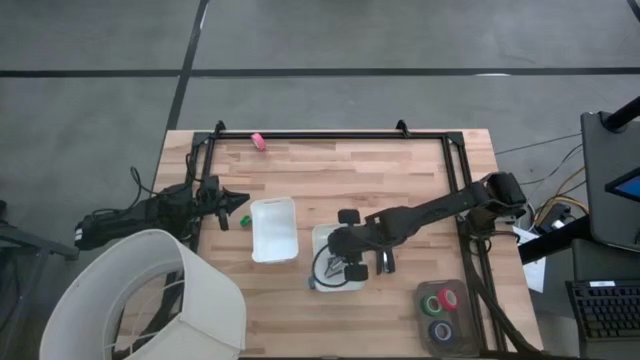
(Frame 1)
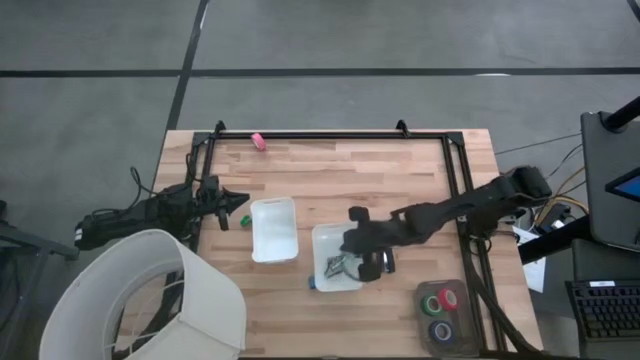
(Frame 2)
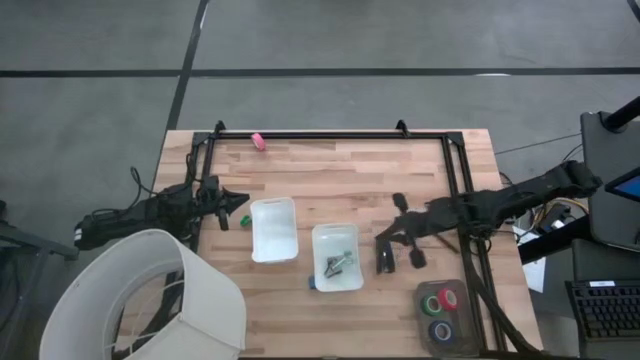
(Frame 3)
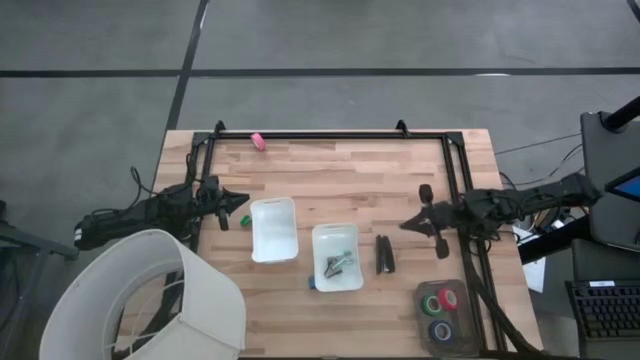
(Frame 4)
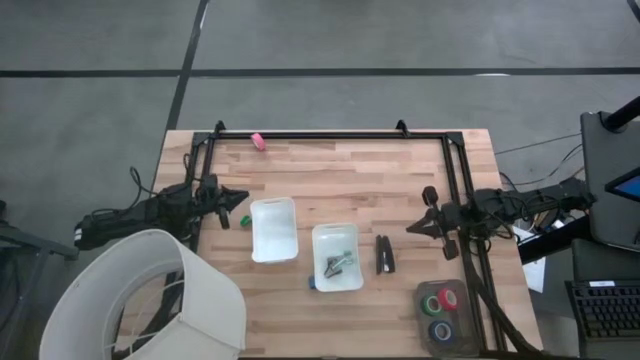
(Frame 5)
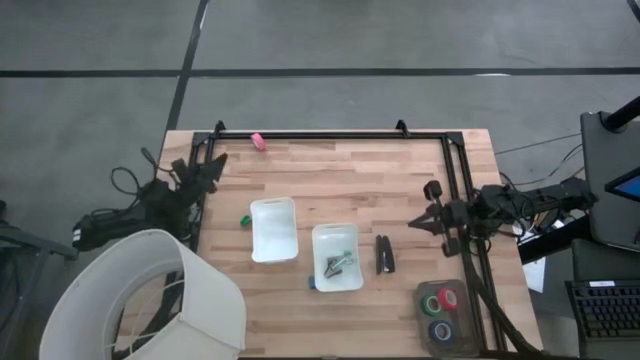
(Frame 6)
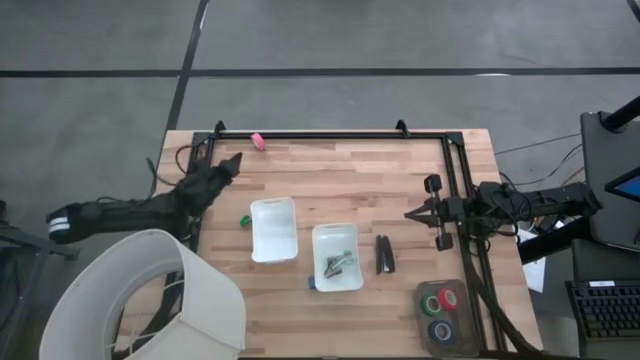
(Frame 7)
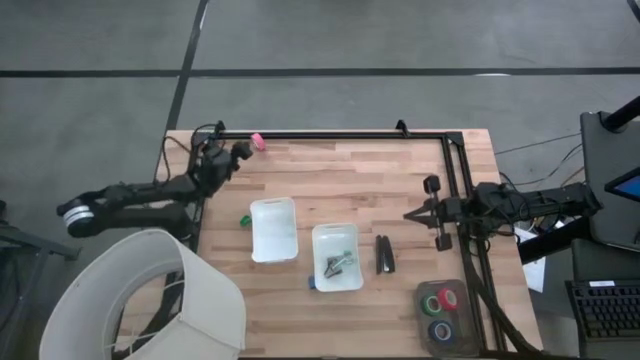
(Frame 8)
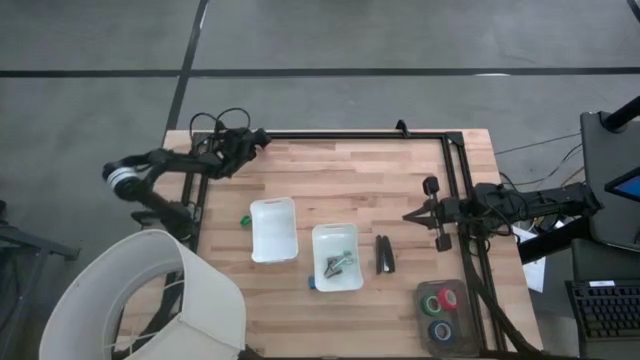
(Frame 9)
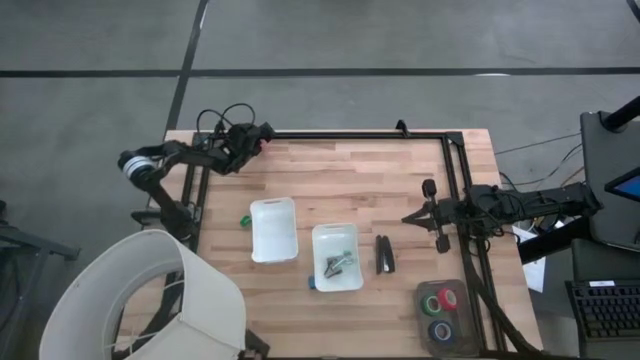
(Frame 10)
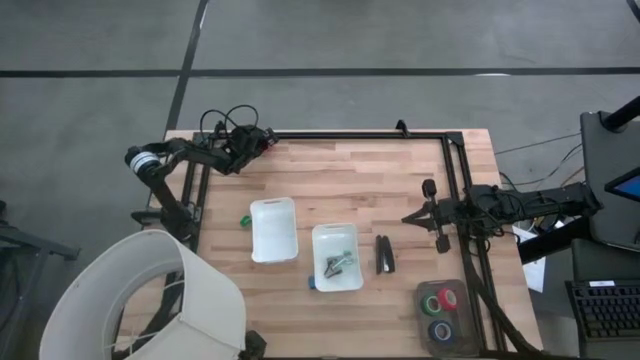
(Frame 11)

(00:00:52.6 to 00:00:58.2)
Task: Pick and place Stapler, Stapler remover, tape
Put the pink tape into the black bin

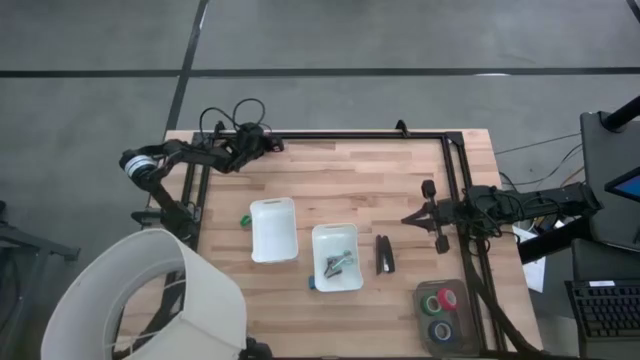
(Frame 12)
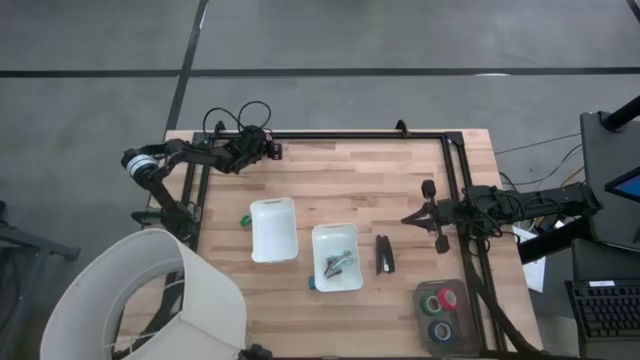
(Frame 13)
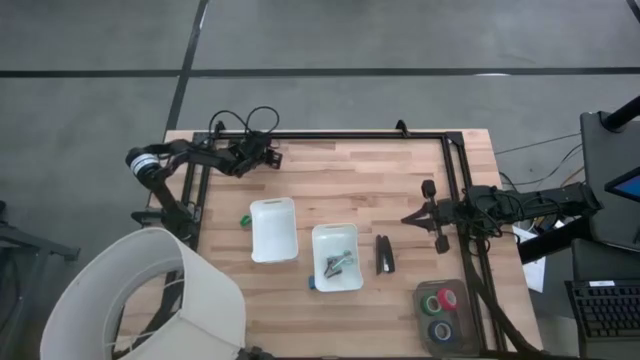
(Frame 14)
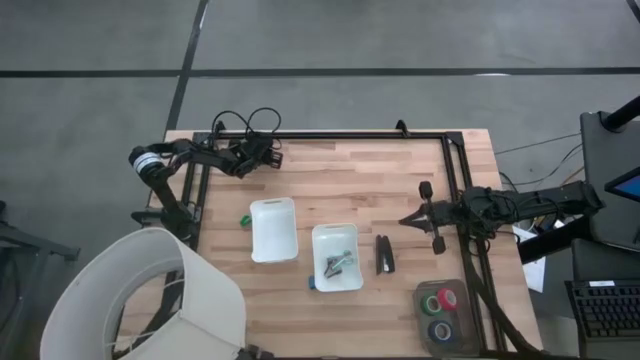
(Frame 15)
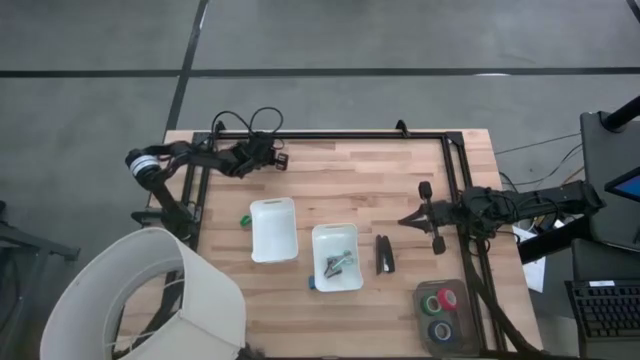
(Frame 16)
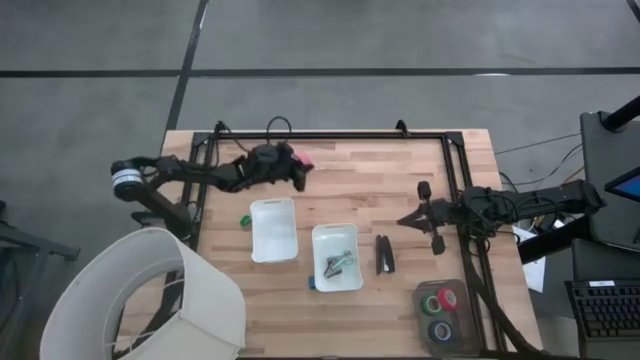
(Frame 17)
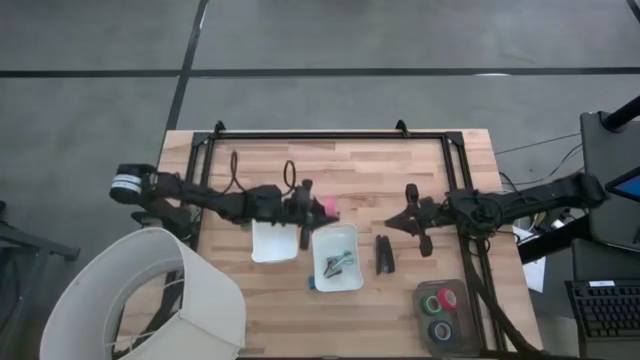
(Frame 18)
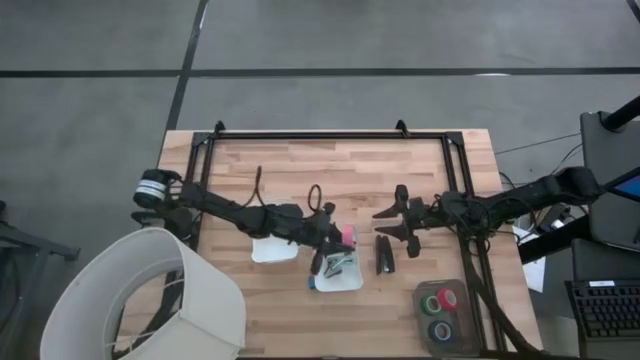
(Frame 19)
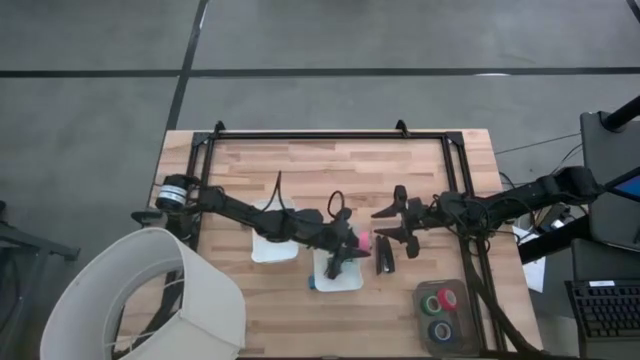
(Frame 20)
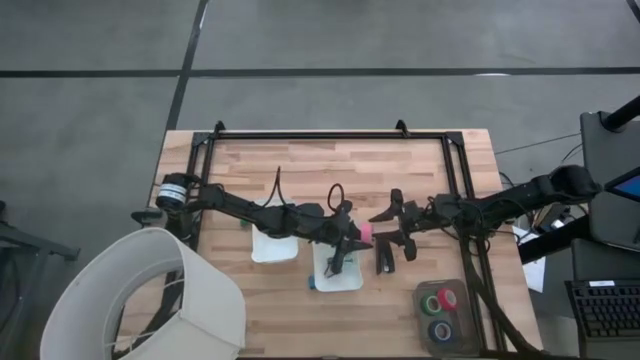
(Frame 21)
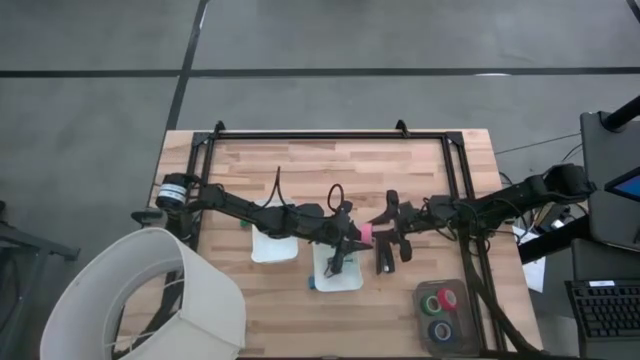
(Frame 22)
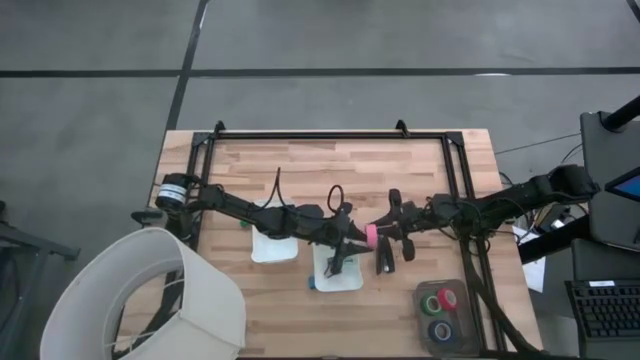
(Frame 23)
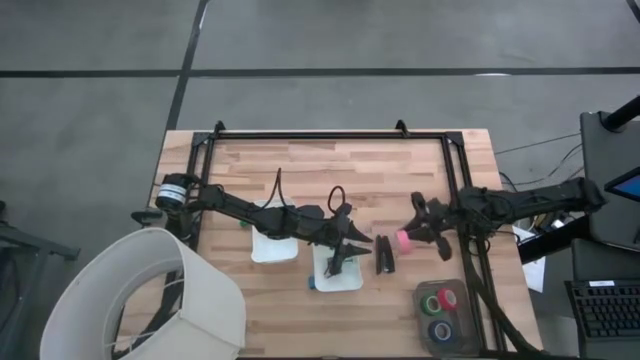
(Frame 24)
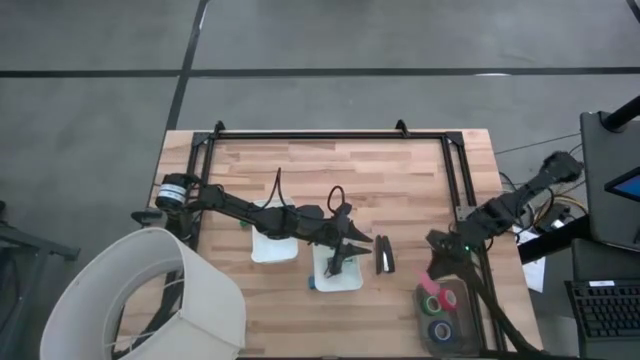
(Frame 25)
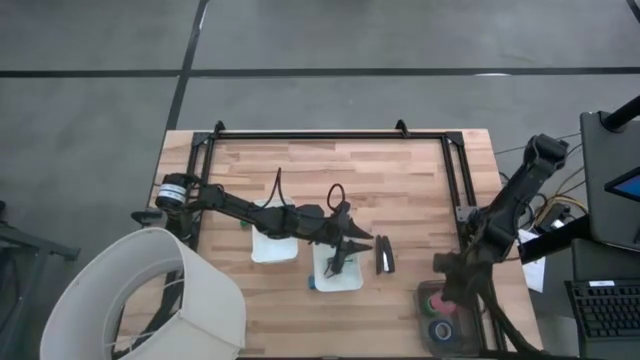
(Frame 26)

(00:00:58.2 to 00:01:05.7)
Put the pink tape into the black bin

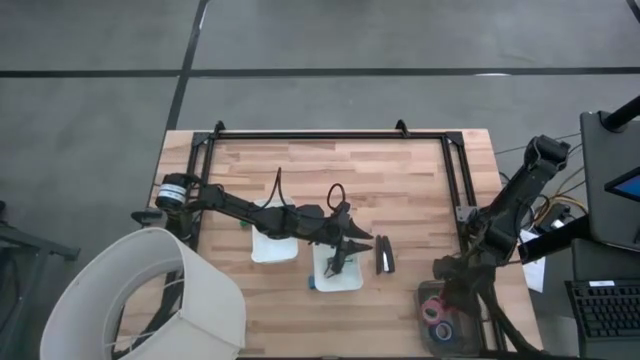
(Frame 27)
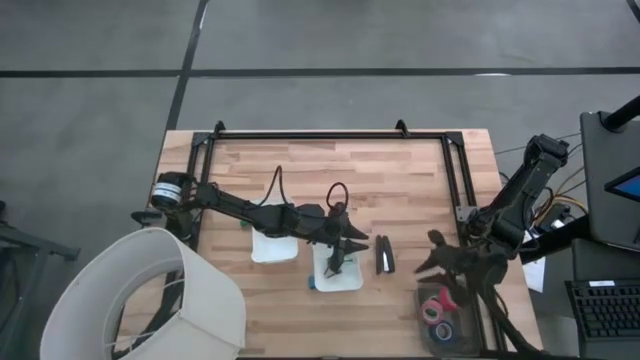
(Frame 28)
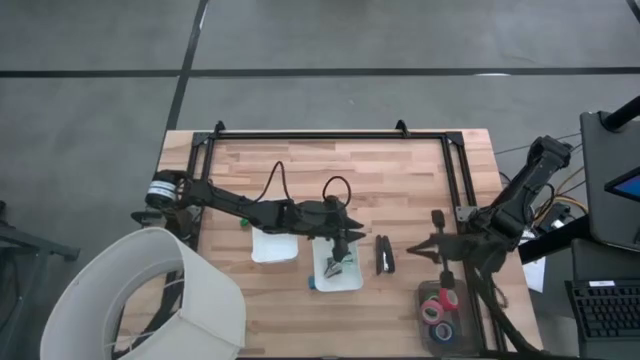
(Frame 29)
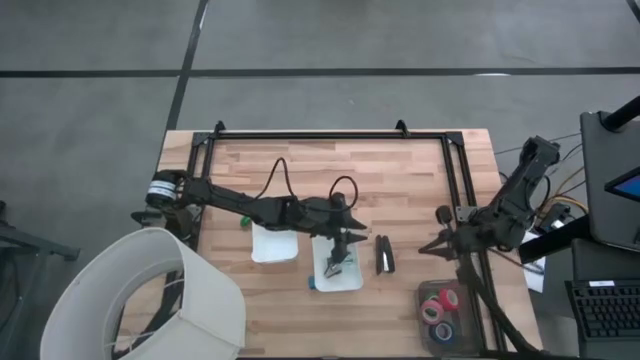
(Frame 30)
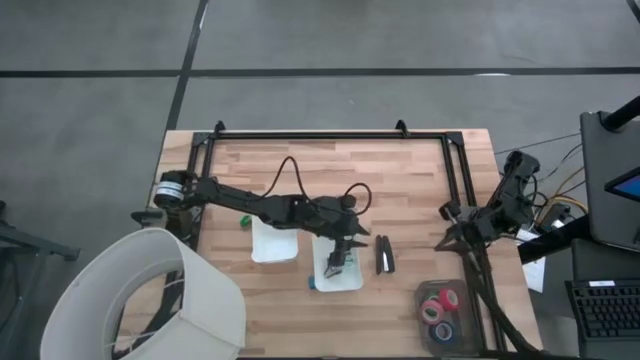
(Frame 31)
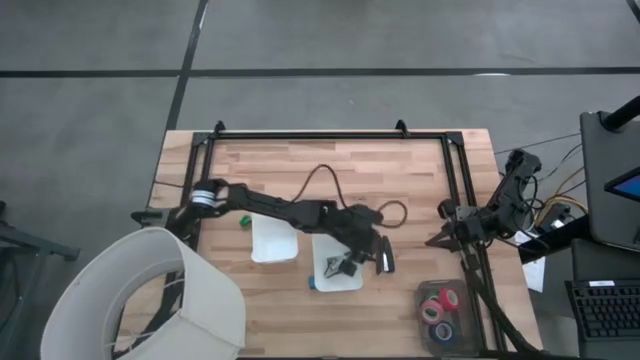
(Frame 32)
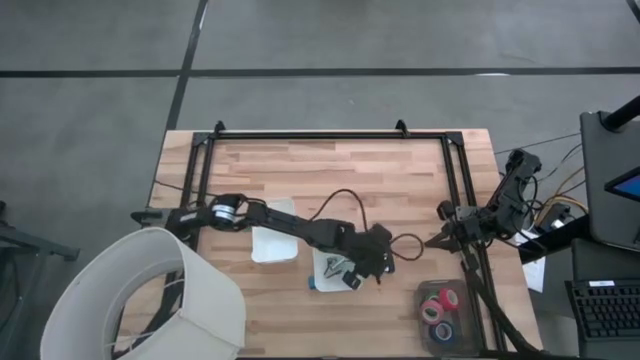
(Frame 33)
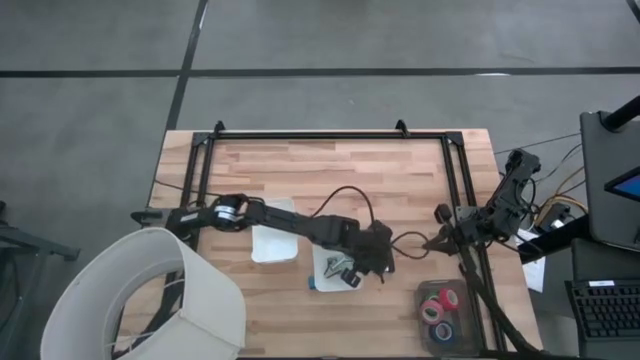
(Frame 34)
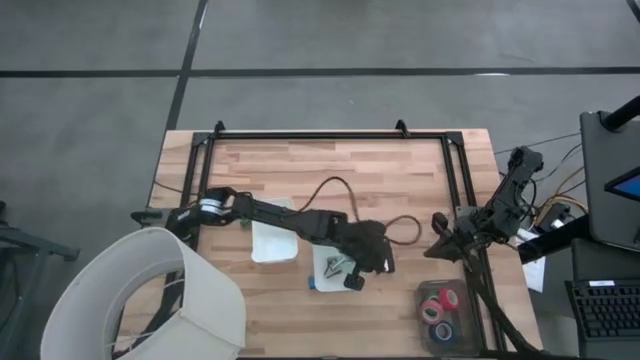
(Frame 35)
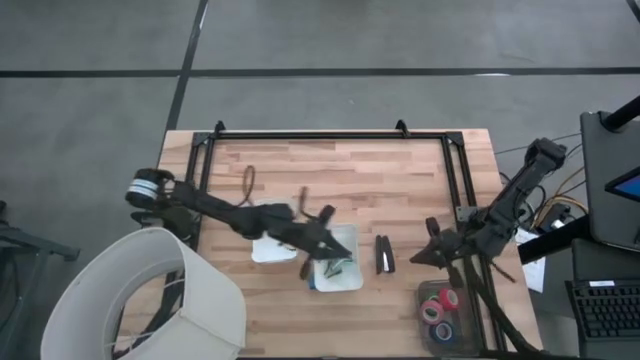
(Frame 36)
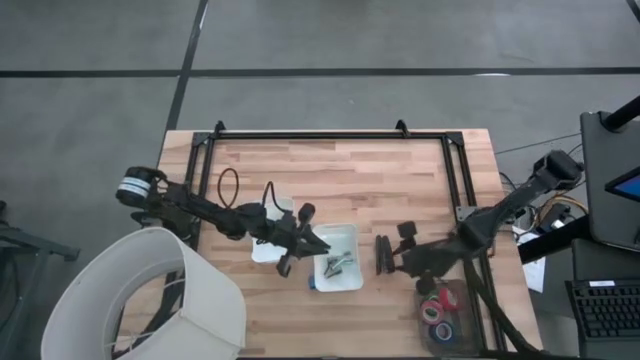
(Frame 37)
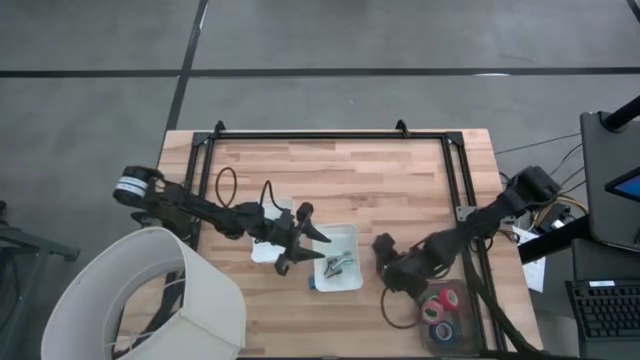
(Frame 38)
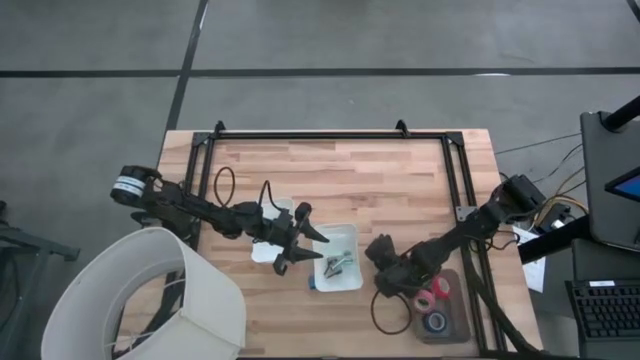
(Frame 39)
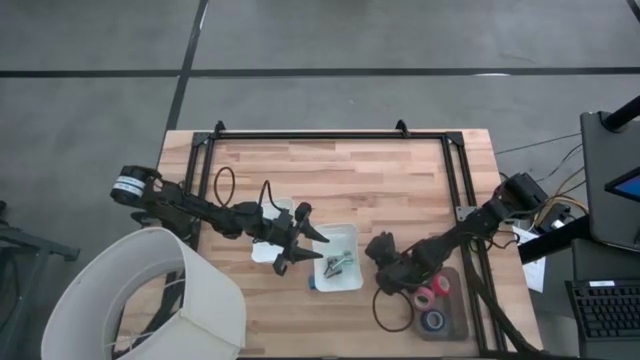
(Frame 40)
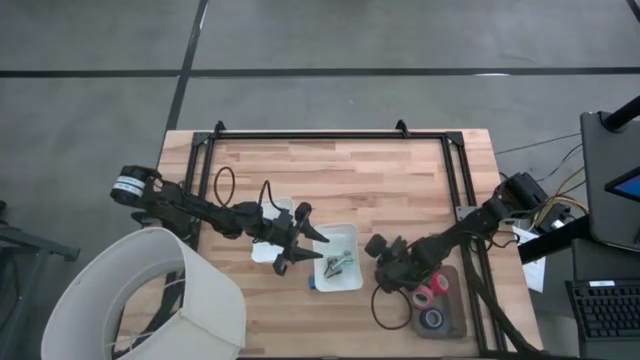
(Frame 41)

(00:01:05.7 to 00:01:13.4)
Put the black stapler into the left white bin

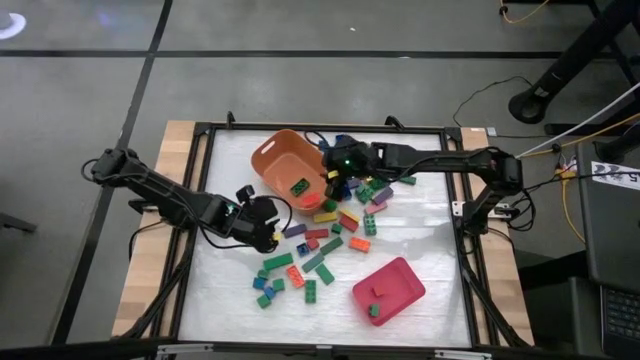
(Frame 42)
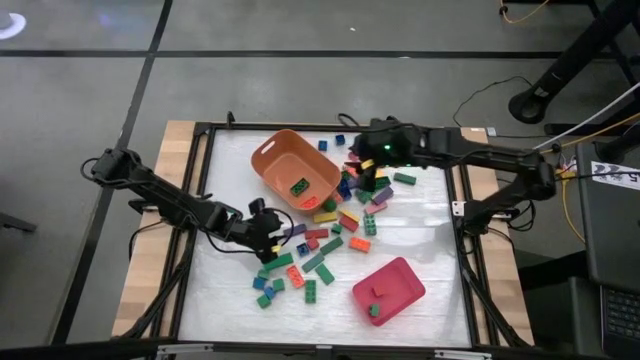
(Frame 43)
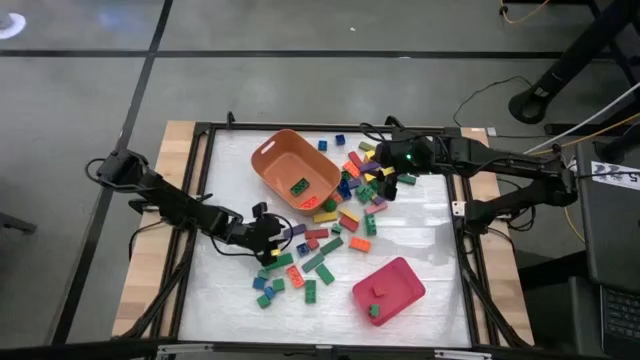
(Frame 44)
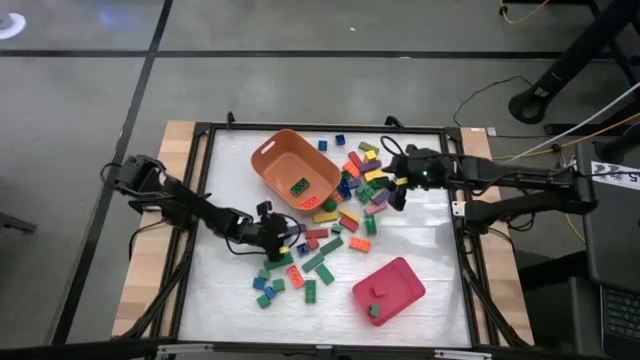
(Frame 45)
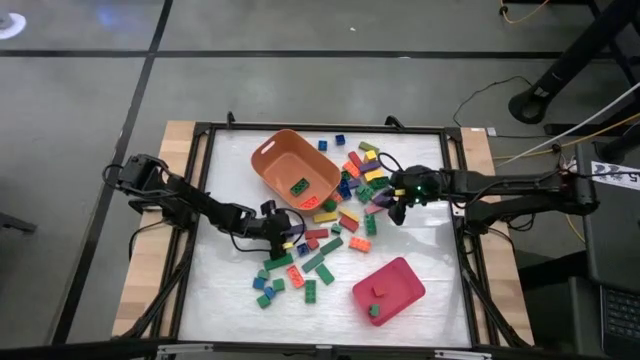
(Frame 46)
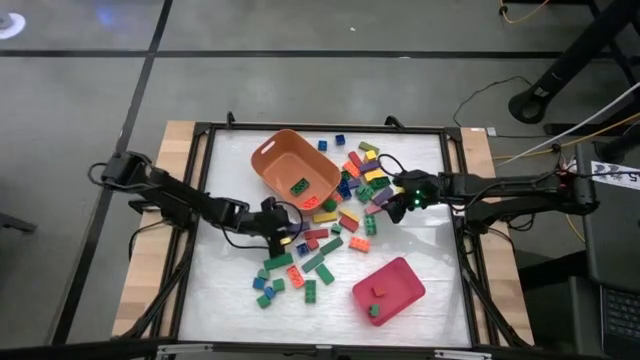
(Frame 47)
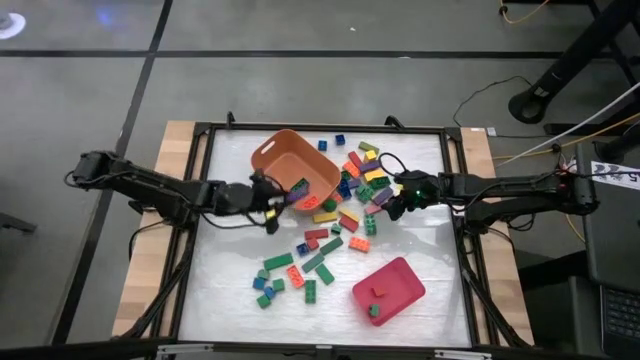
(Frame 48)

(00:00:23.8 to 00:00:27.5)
Task: Sort blocks by size
Put the large dark blue block into the orange bin
